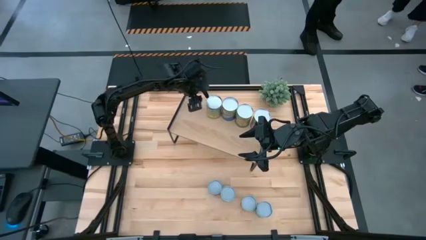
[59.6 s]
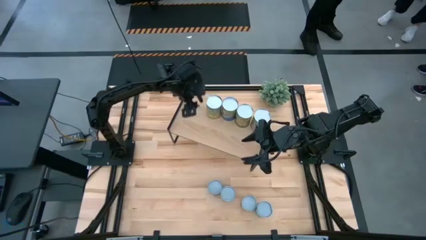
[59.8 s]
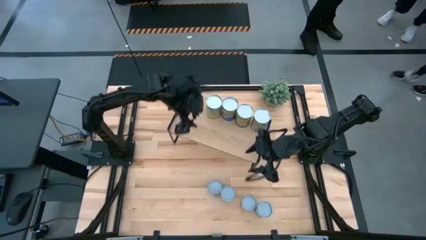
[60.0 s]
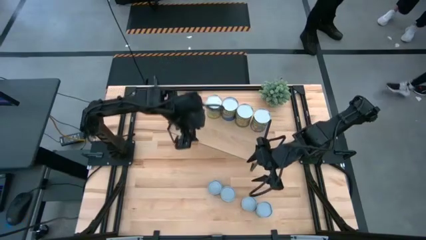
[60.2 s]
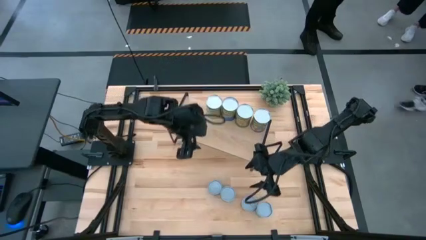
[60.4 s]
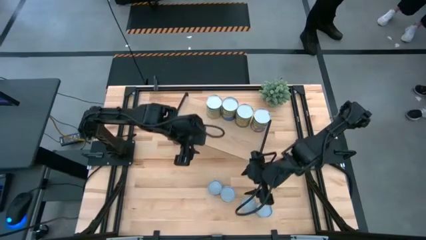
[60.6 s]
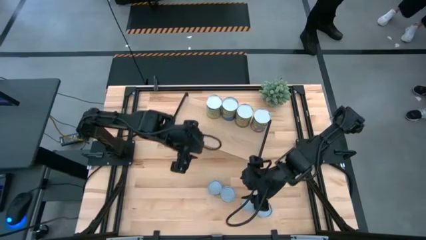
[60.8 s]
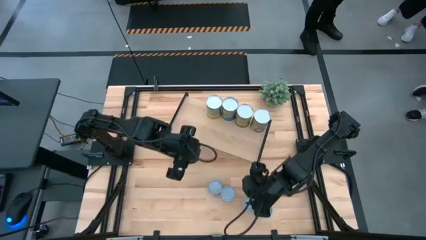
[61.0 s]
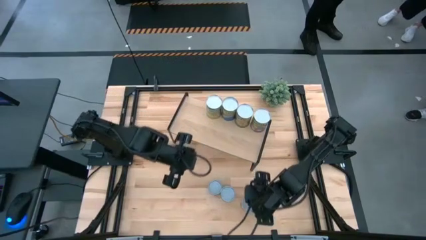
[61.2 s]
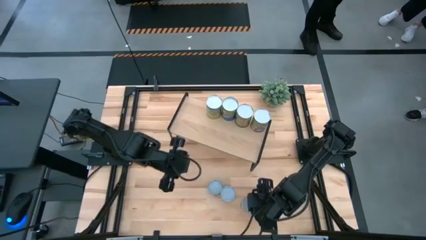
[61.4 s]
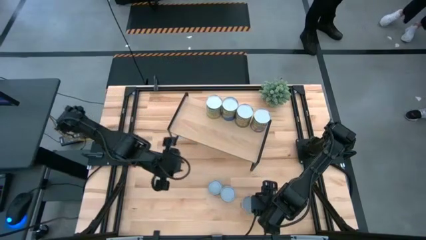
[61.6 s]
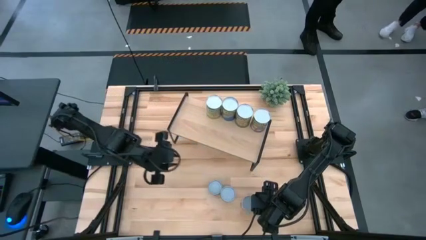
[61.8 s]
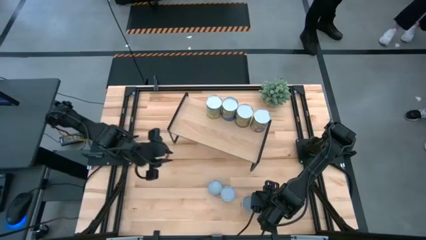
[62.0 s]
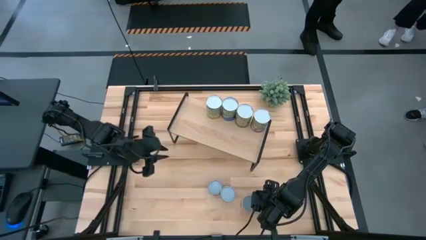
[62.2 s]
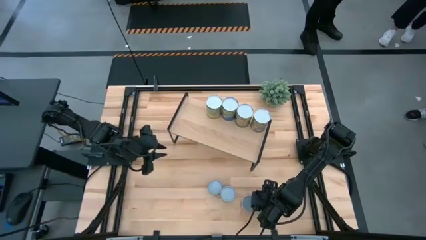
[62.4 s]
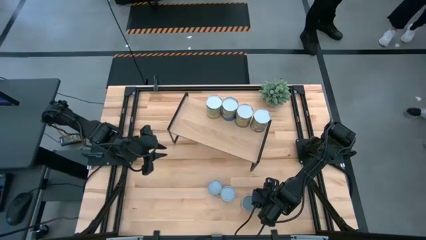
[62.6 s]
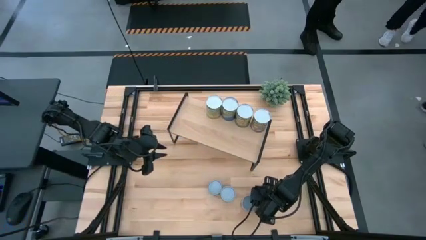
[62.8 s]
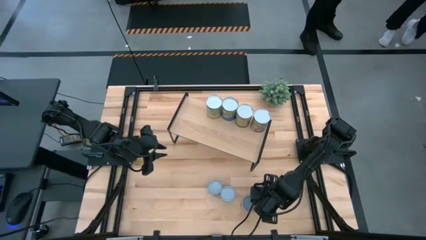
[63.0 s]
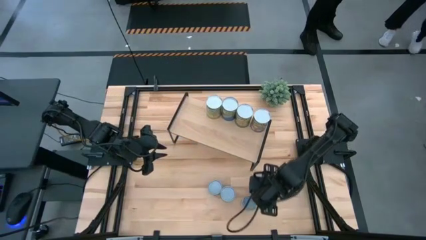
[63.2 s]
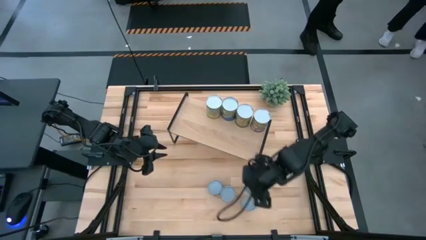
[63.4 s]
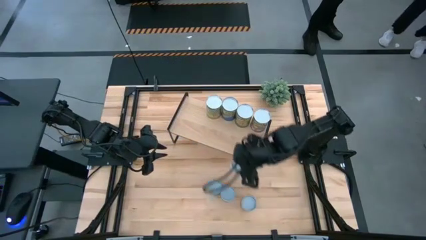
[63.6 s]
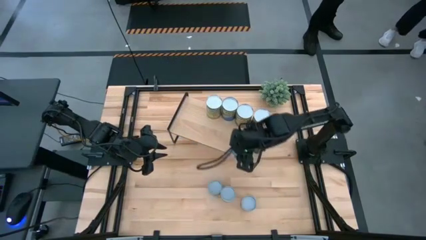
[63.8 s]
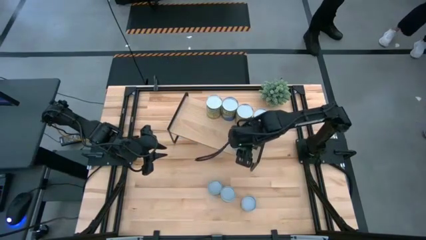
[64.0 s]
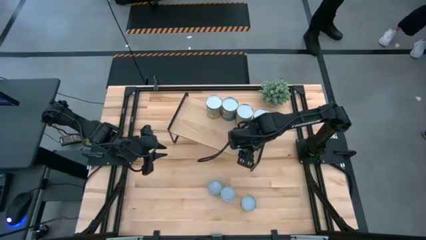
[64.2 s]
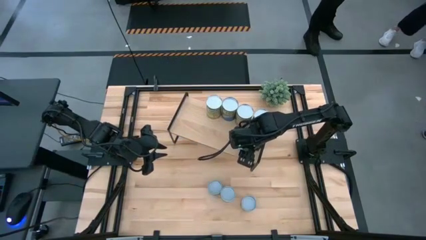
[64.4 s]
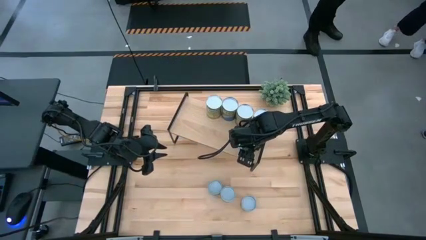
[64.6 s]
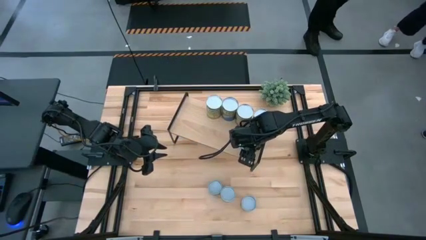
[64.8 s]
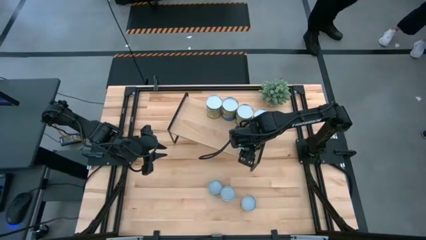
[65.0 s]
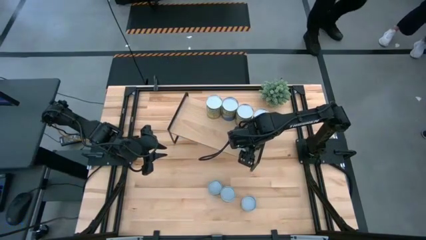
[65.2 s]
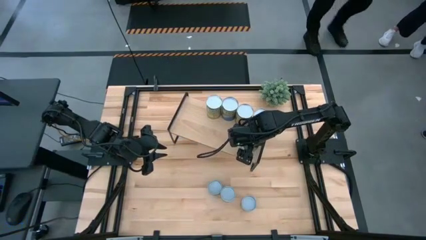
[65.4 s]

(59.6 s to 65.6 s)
Task: Pick and place cans onto a shelf
Put the canned mixed vegetables on the shelf

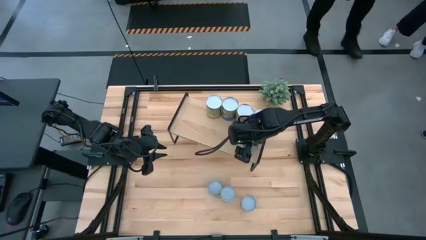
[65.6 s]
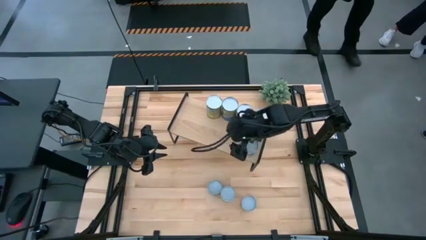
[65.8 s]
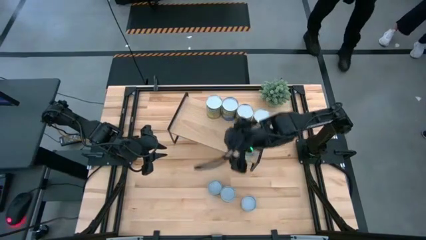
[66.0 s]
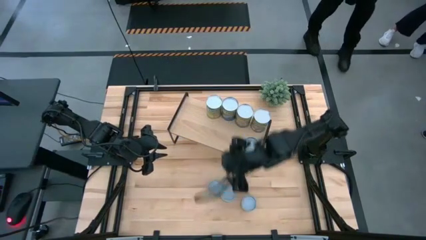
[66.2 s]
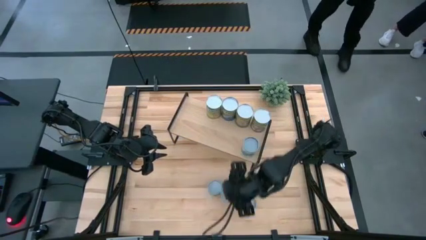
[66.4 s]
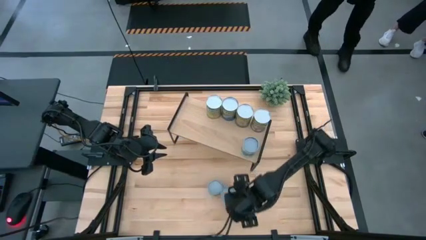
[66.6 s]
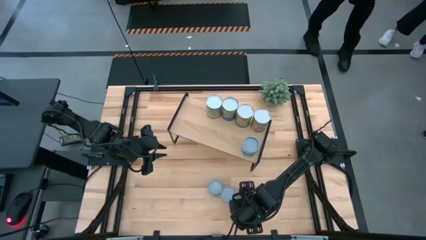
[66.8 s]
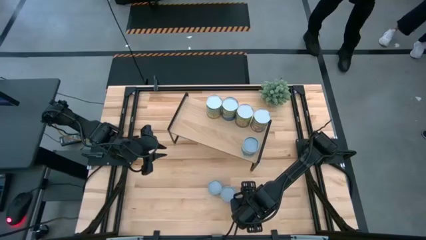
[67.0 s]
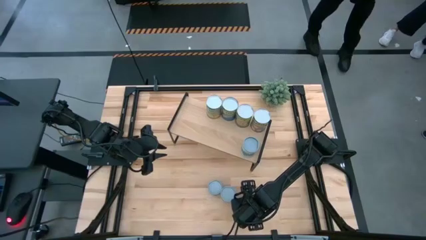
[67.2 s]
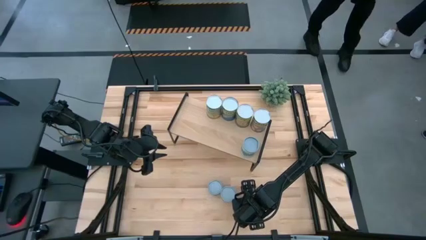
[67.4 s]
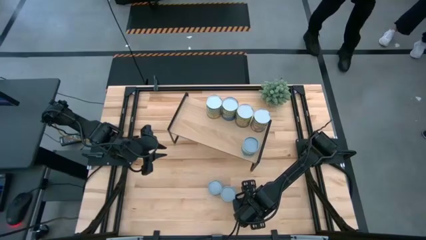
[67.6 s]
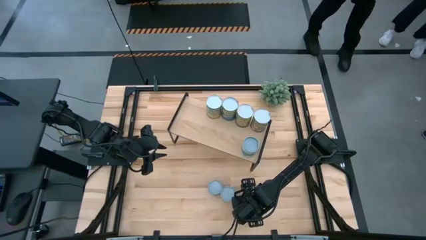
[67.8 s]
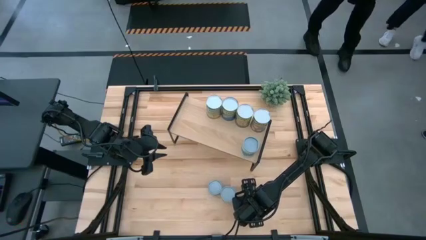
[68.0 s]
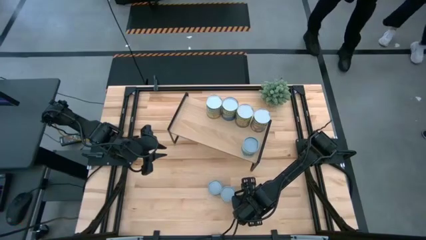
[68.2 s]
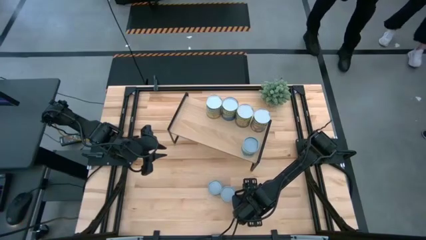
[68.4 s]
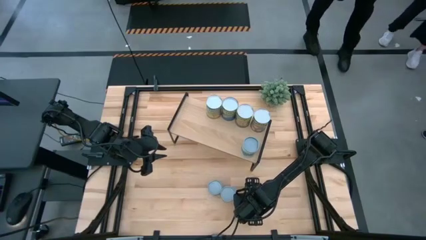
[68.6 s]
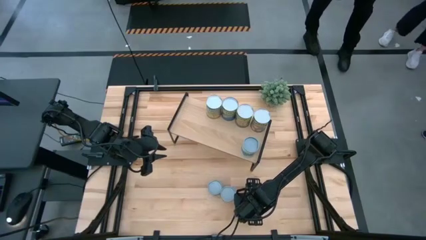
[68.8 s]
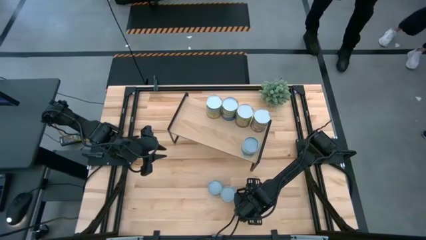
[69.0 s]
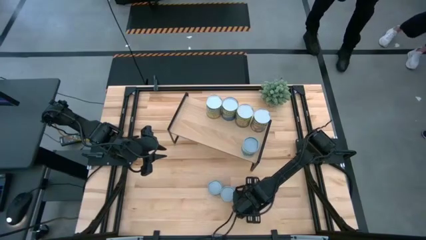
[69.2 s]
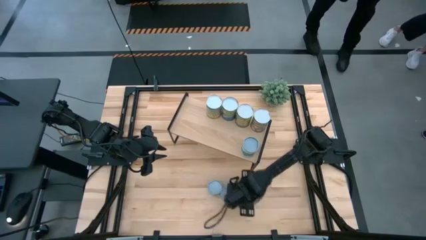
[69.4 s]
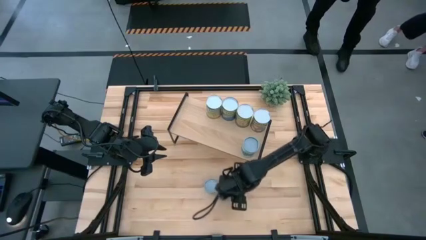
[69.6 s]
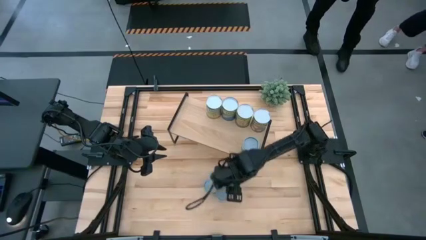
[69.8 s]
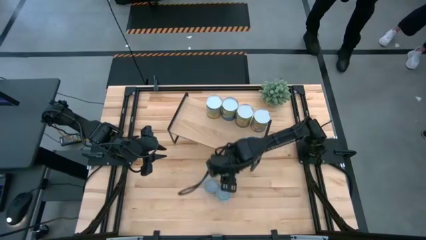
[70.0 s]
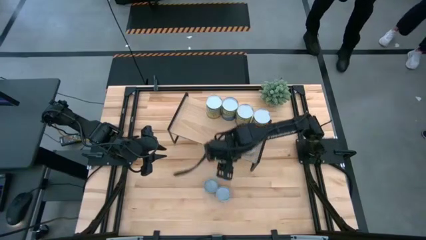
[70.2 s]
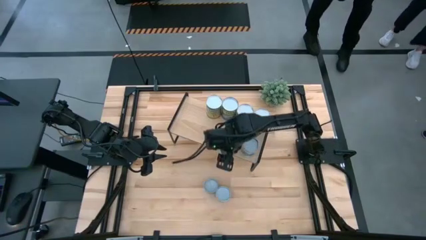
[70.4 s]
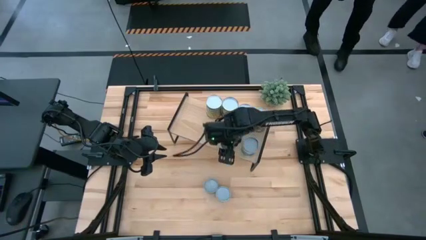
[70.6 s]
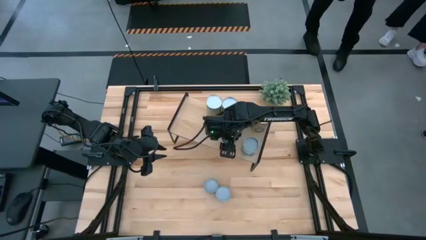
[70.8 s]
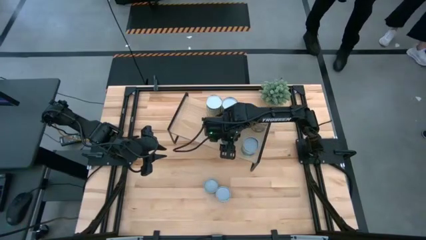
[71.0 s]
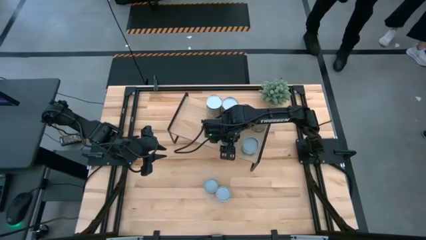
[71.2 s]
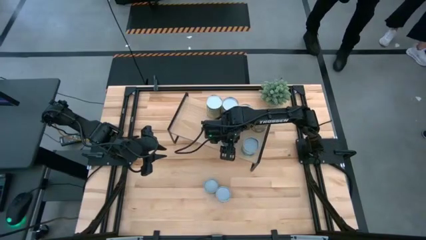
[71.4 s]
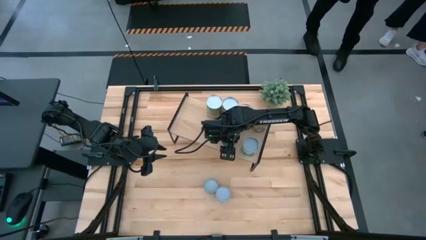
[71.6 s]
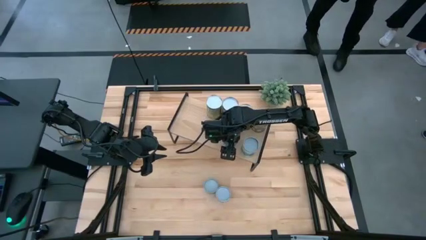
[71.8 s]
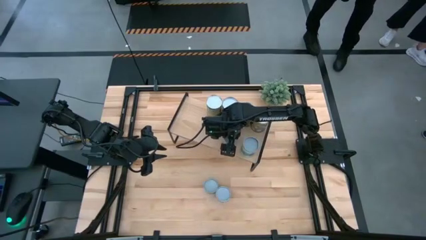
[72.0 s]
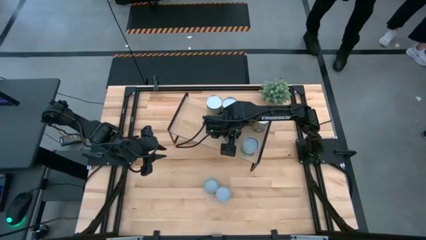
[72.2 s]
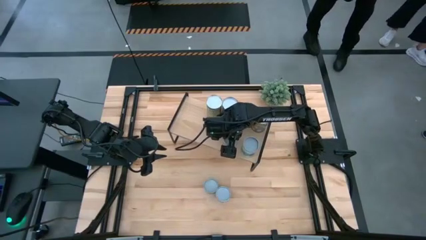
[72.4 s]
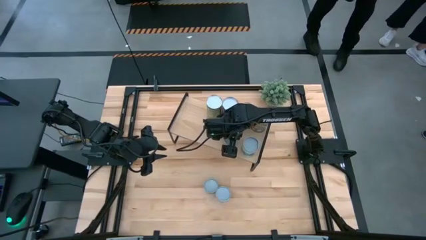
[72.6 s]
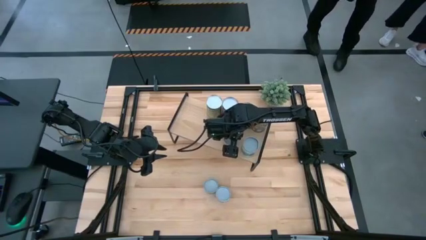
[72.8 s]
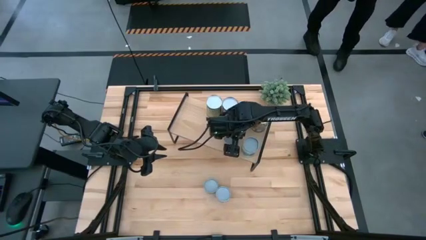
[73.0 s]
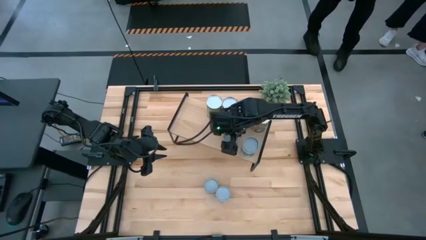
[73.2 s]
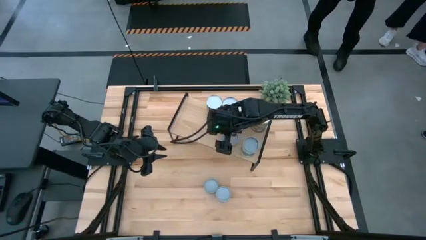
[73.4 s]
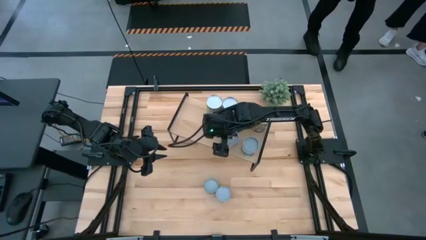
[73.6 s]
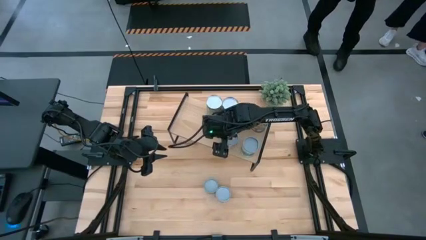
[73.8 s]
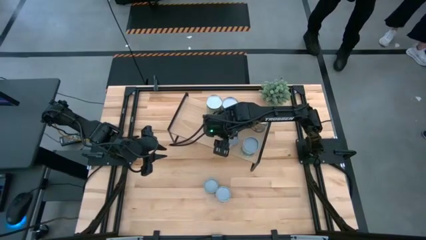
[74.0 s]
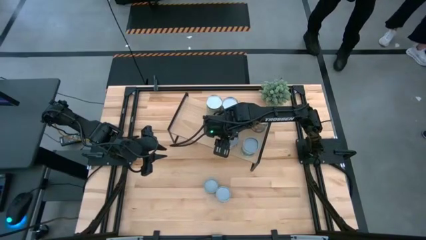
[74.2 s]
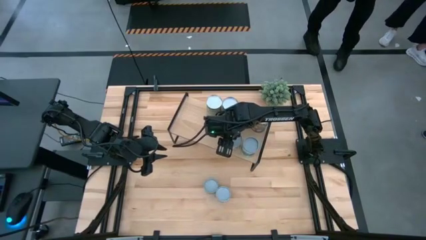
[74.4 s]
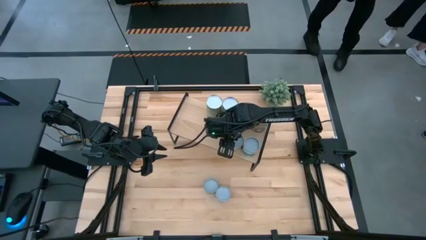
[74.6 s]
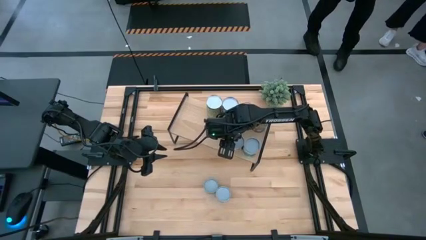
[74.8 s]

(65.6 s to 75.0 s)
Put the canned tomatoes on the shelf

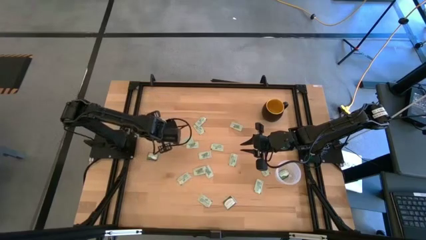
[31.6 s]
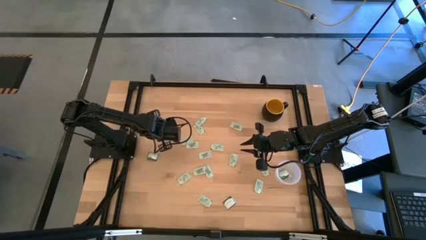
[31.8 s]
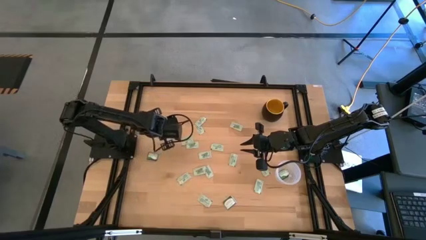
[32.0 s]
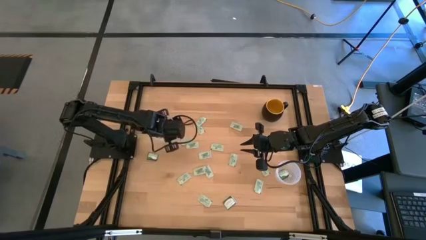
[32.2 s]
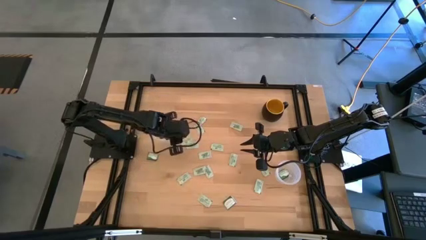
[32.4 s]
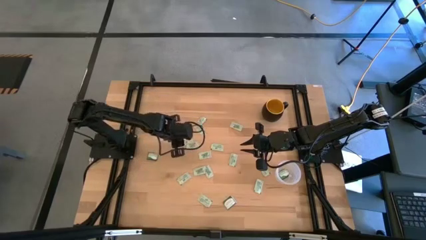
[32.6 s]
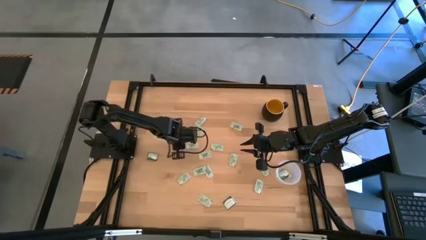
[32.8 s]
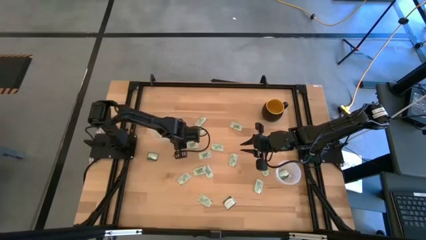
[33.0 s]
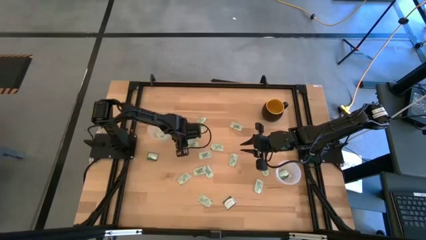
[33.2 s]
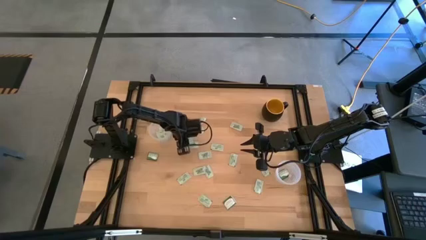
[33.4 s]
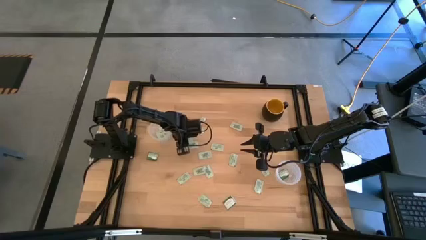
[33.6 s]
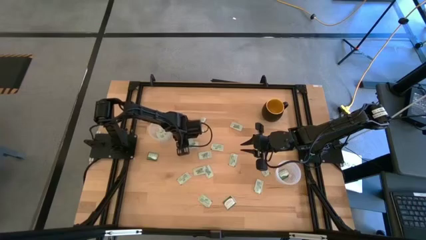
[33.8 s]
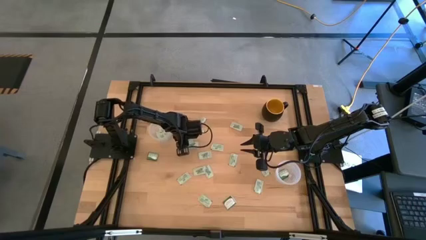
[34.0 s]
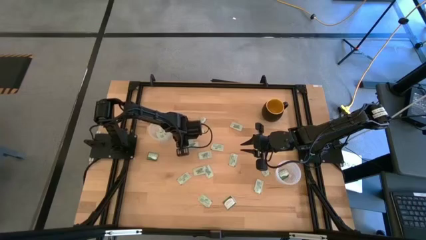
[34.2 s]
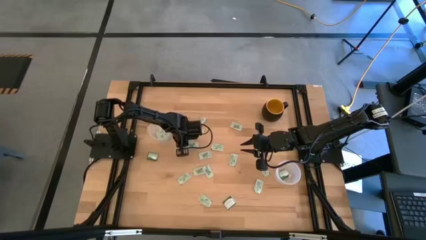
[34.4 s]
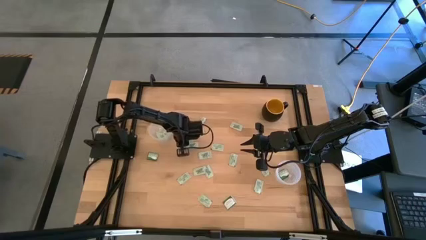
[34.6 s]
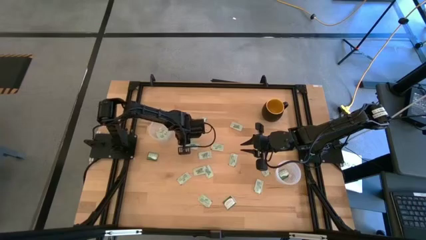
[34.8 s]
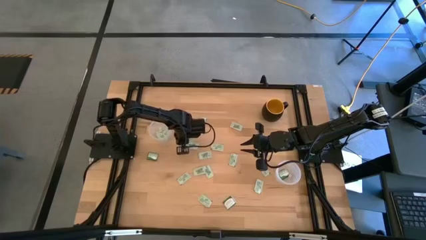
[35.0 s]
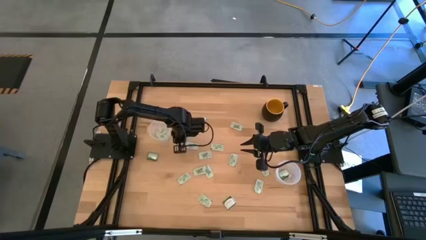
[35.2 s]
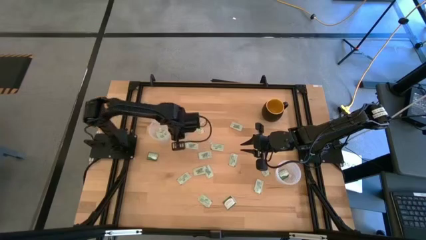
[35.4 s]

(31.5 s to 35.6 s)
Task: Pick and place Stevia / Truvia into bins
Put the white stevia packet into the left transparent container
